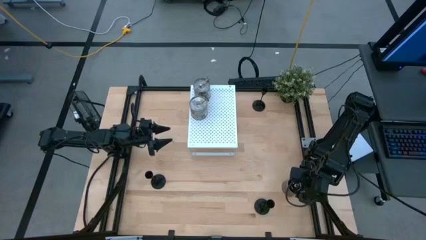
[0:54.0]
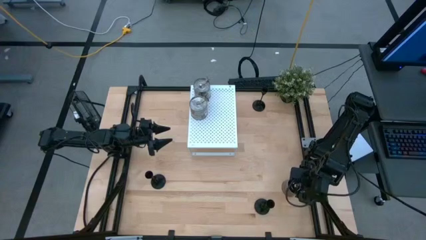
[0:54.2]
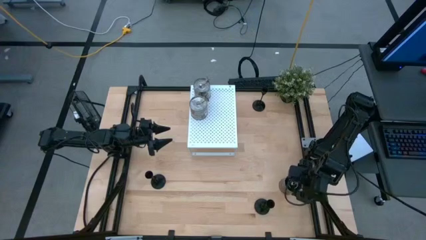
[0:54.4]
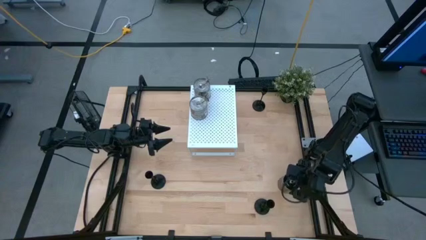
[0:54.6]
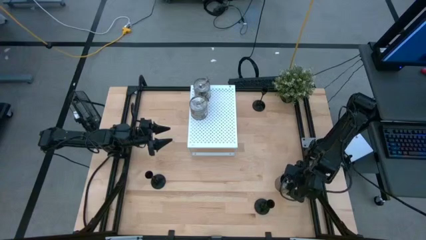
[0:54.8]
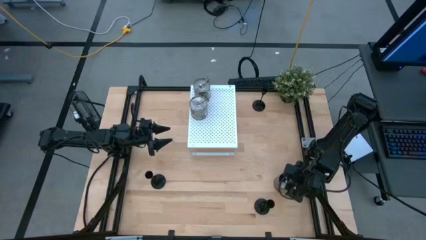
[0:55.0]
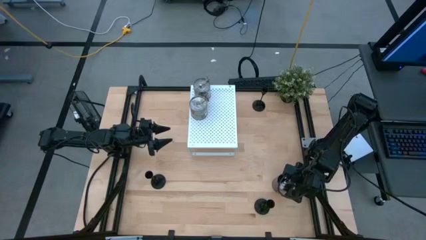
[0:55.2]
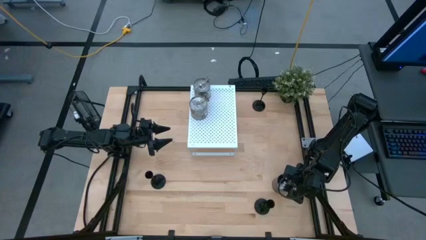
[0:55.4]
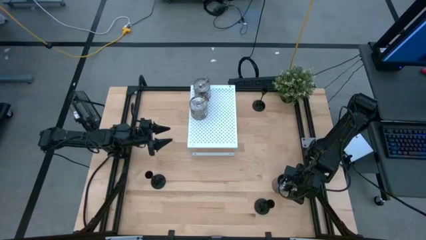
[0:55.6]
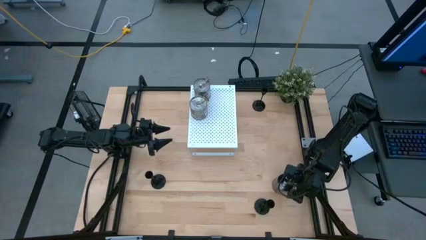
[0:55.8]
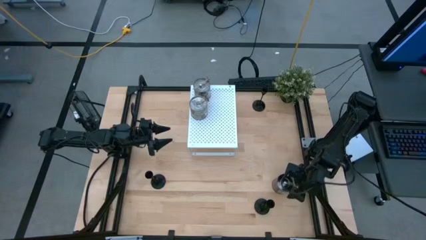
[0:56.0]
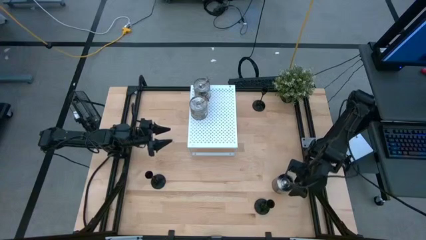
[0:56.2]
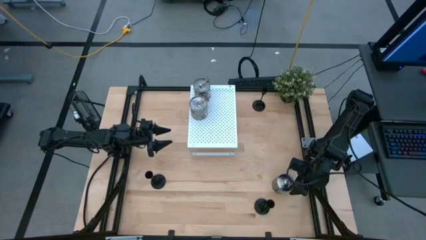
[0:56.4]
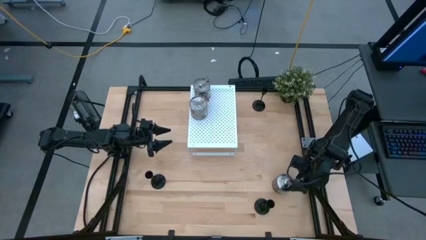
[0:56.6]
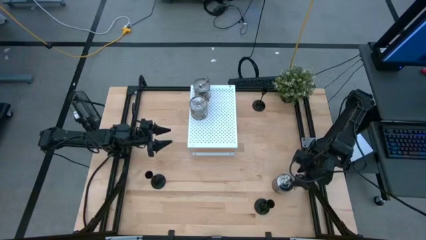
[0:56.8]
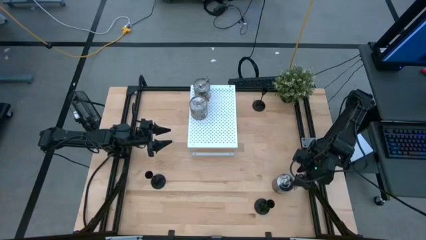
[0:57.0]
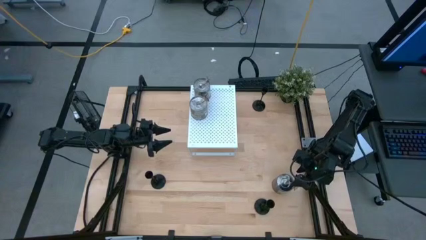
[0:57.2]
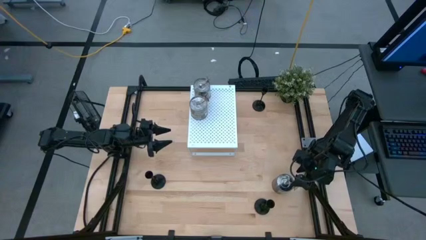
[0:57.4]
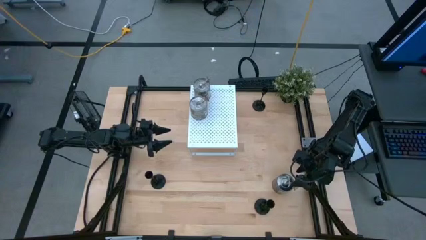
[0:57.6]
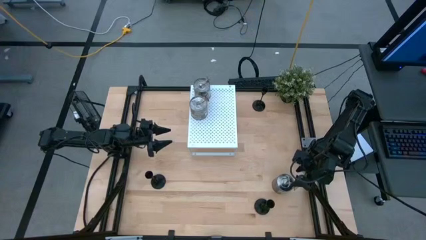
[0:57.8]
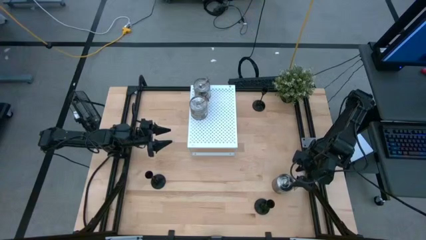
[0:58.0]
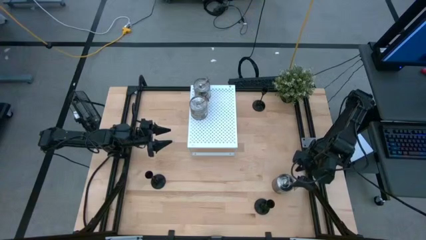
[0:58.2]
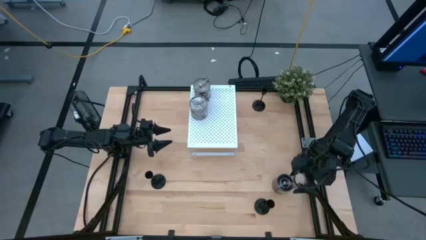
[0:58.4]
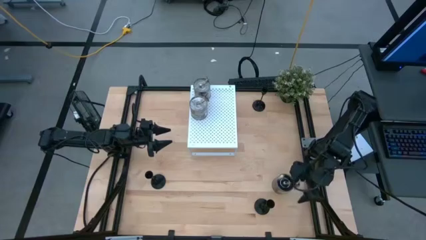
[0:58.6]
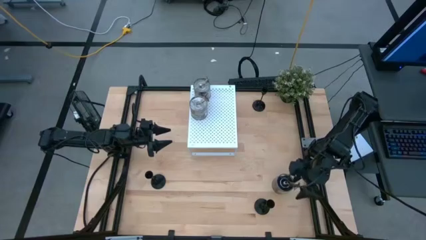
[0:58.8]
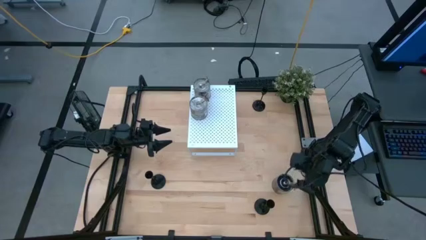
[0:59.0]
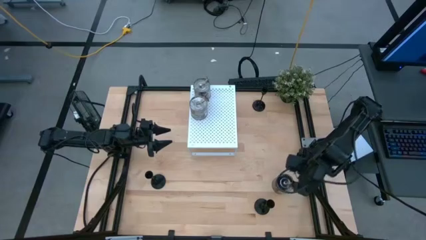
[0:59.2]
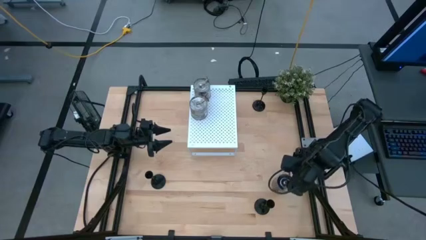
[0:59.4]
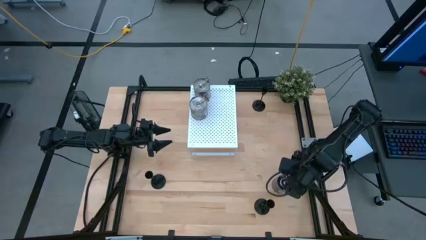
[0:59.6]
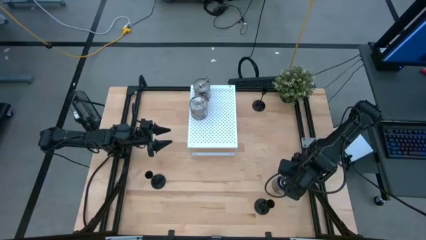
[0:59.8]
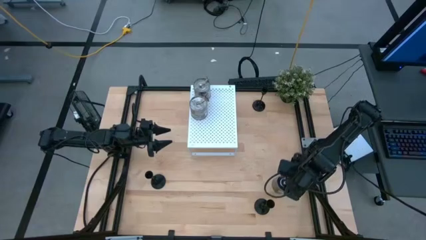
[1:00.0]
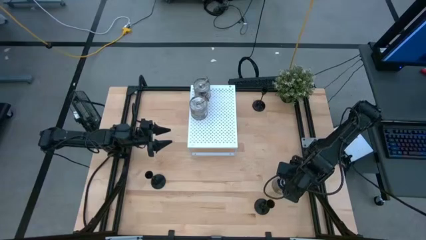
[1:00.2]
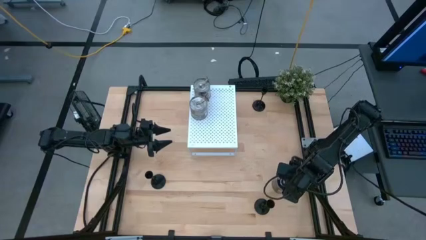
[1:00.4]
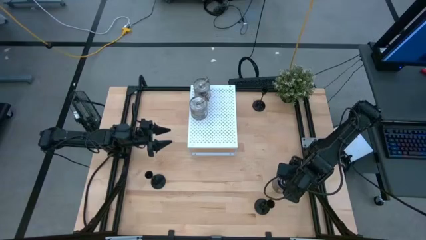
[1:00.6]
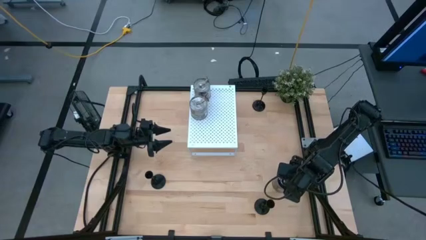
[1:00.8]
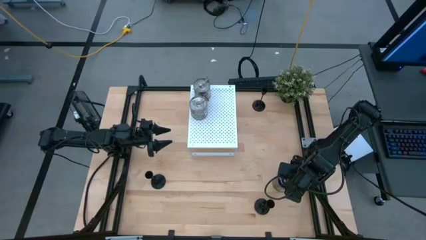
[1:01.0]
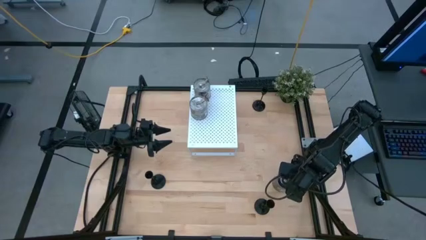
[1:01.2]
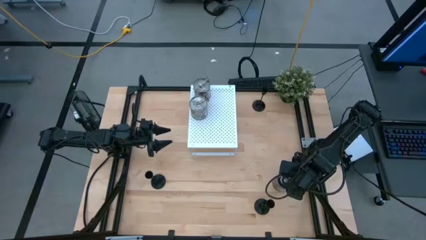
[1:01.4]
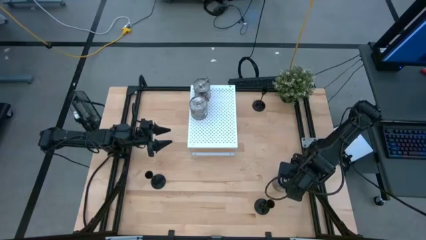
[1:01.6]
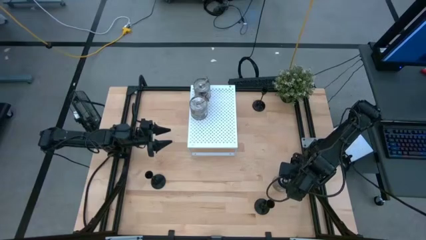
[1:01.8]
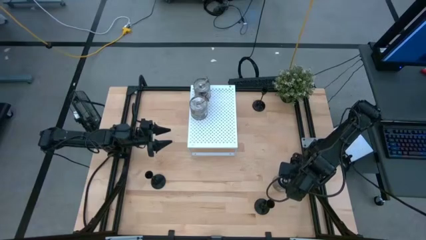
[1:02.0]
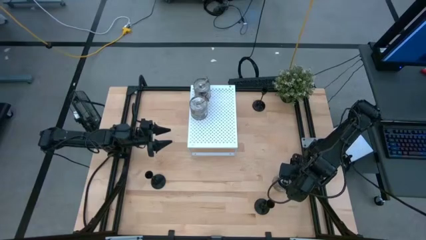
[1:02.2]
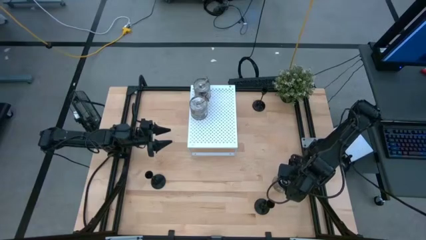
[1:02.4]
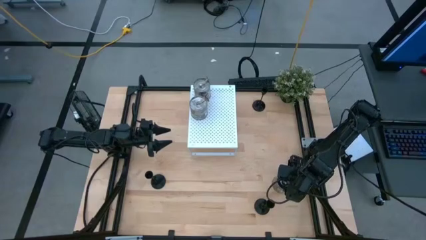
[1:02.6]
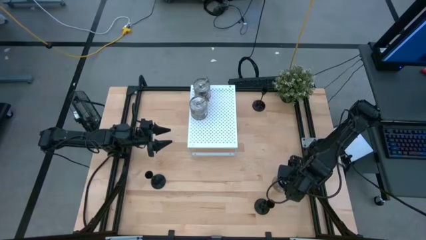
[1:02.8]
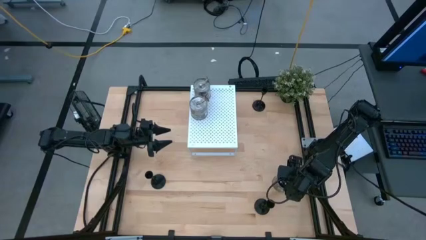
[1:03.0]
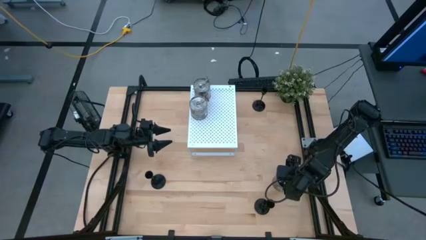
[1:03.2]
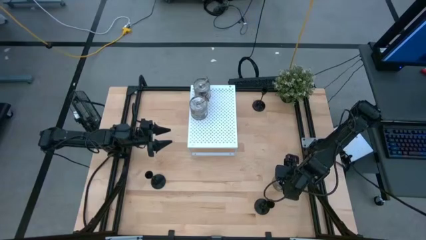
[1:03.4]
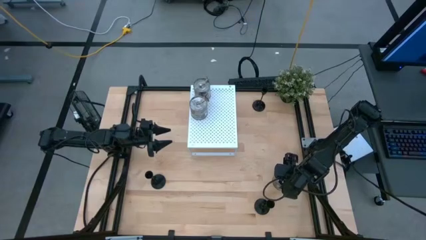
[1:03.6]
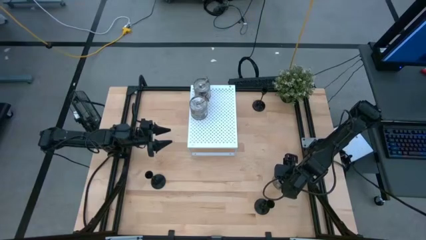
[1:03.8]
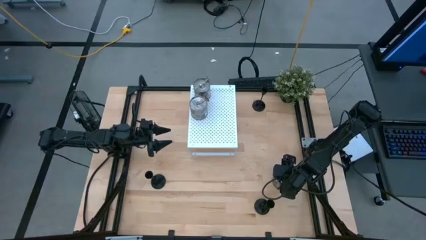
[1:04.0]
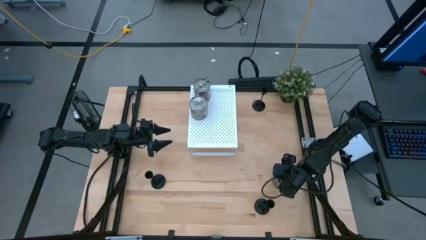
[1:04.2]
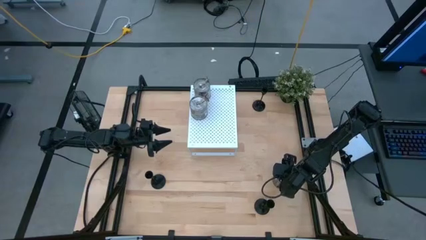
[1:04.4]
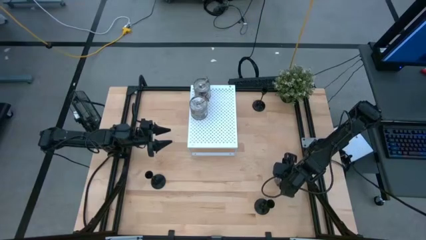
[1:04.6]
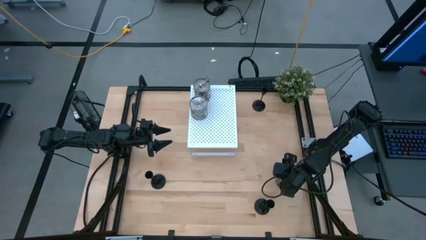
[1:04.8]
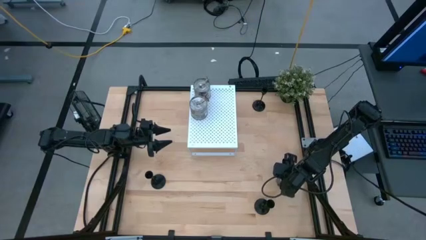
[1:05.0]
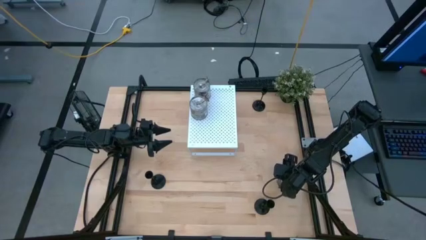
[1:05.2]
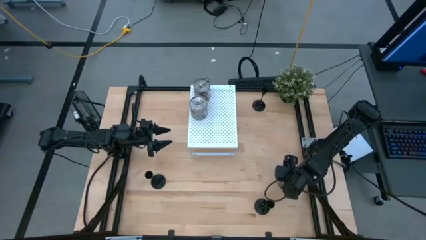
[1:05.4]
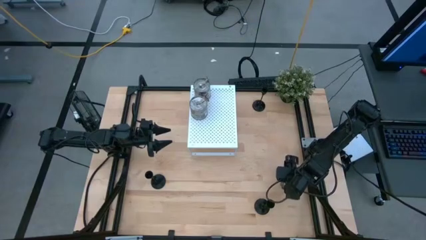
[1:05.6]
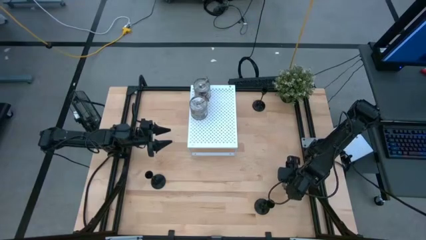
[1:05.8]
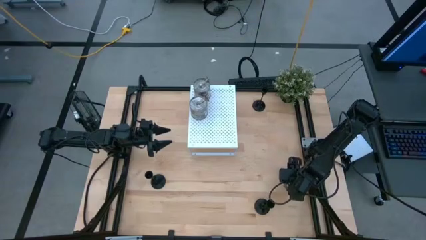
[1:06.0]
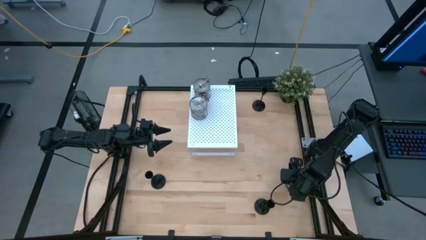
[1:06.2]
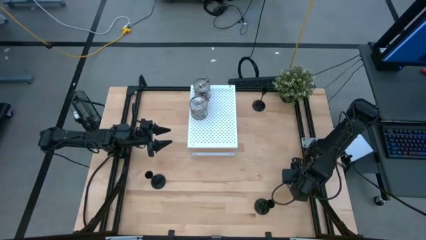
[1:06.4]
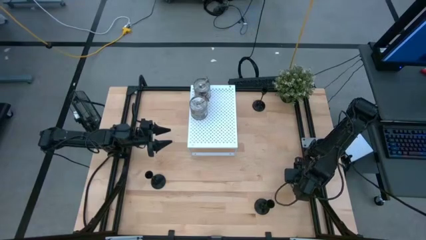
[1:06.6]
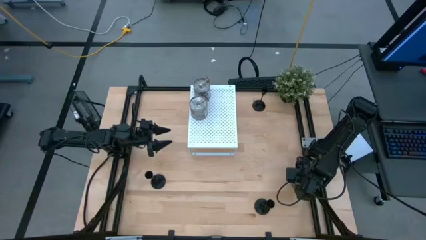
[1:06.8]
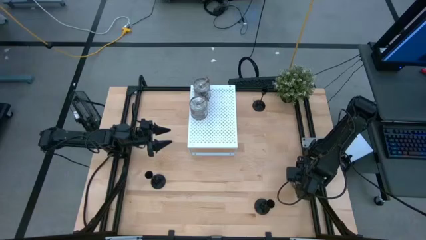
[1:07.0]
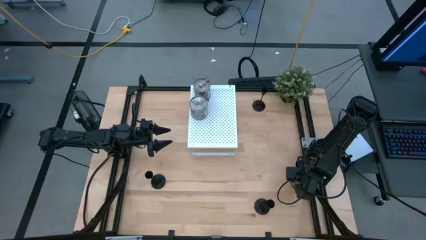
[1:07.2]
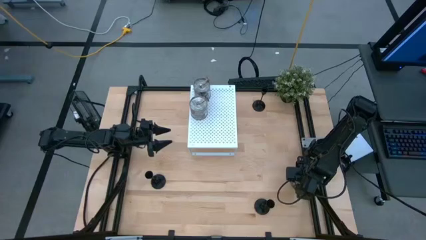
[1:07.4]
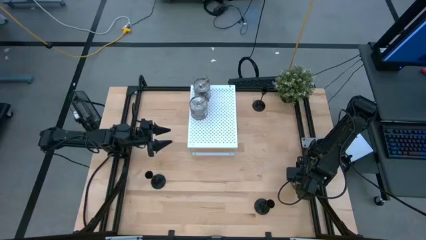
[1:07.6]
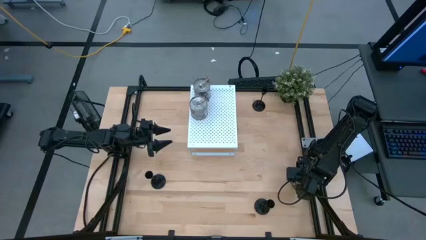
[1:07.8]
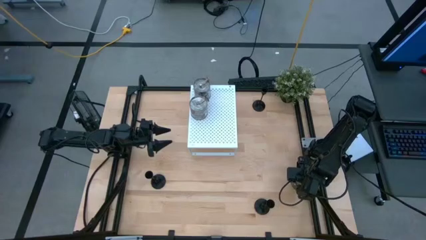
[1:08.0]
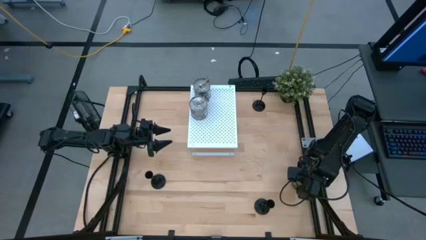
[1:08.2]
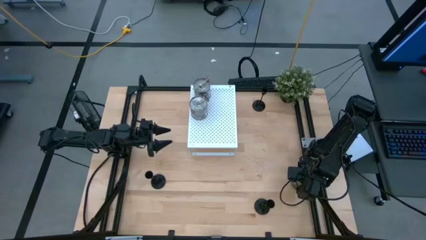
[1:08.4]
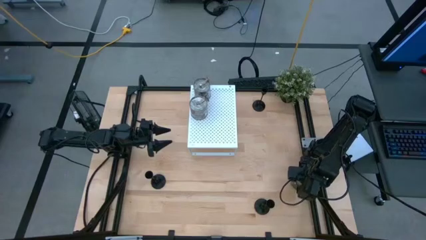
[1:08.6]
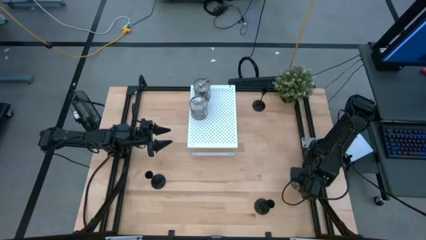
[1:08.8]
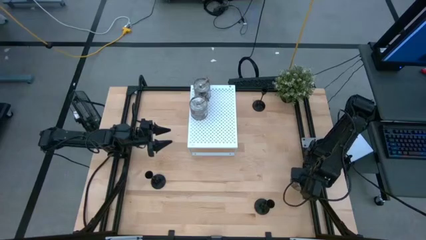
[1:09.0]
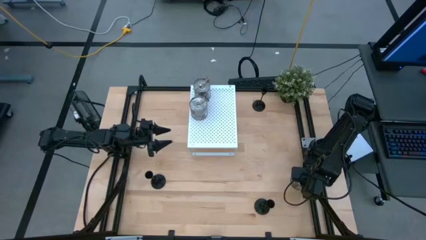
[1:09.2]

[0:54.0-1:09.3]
Task: Pick & Place candle stick holders
Put the silver scented candle on the shelf
